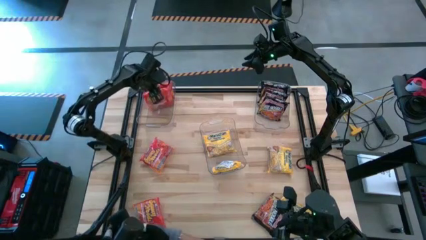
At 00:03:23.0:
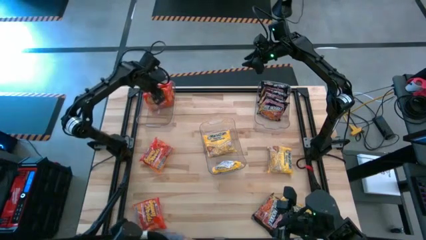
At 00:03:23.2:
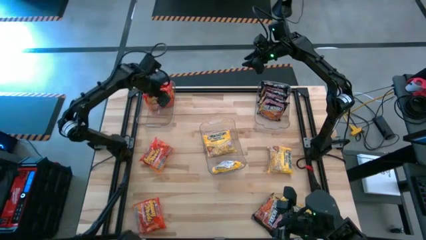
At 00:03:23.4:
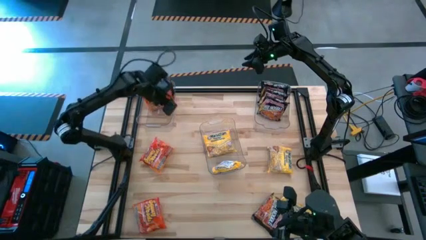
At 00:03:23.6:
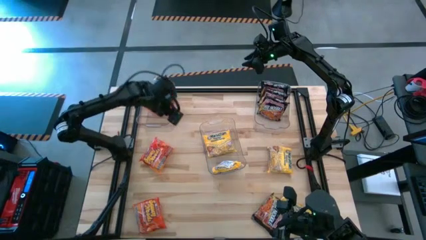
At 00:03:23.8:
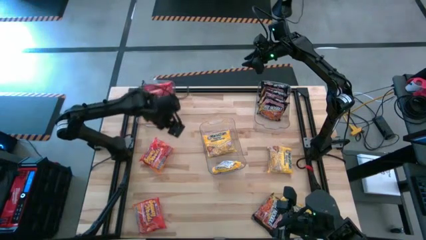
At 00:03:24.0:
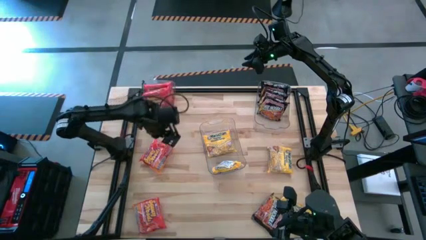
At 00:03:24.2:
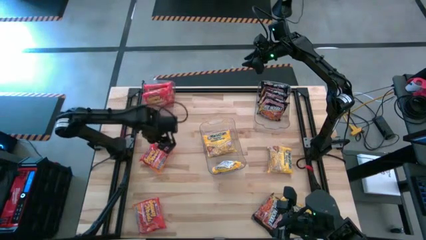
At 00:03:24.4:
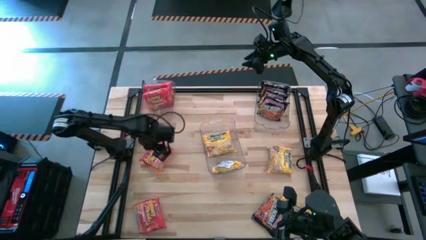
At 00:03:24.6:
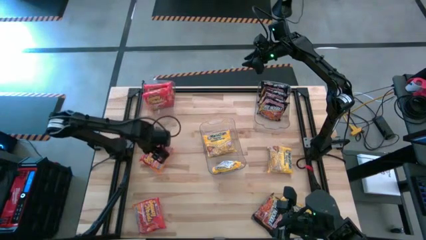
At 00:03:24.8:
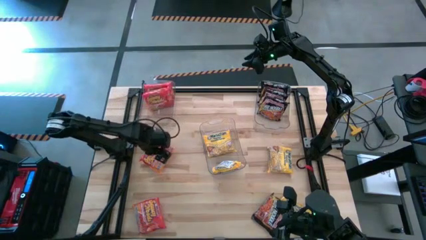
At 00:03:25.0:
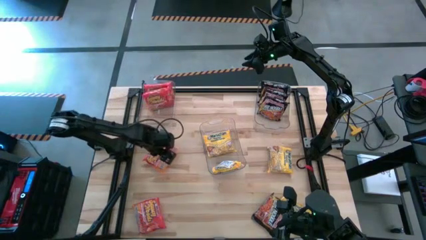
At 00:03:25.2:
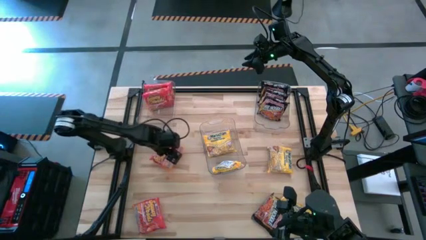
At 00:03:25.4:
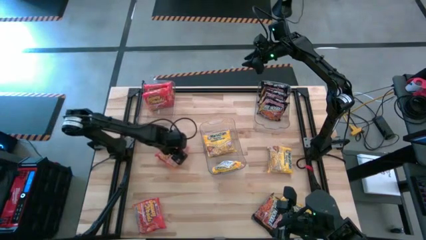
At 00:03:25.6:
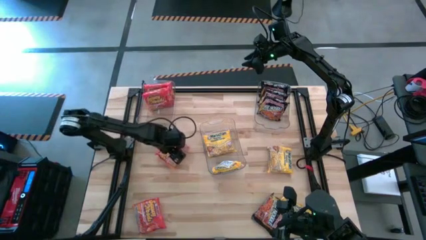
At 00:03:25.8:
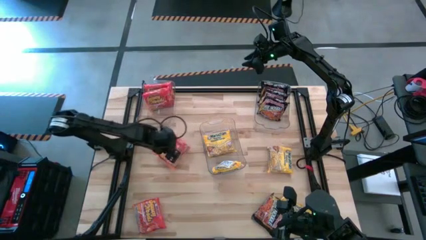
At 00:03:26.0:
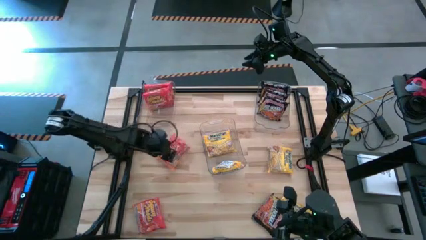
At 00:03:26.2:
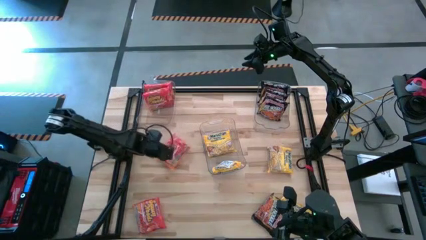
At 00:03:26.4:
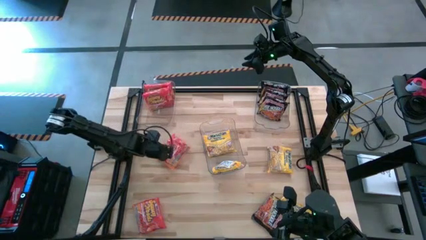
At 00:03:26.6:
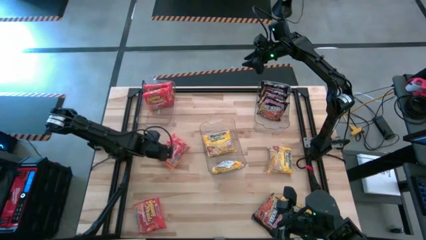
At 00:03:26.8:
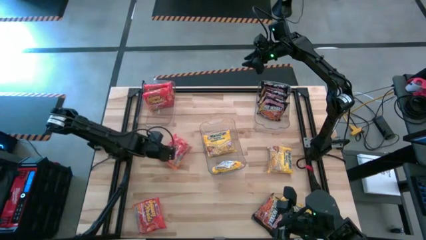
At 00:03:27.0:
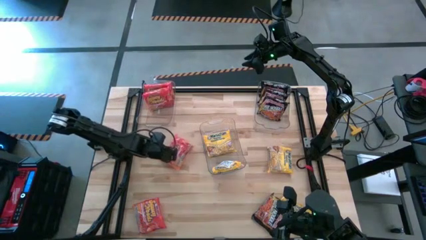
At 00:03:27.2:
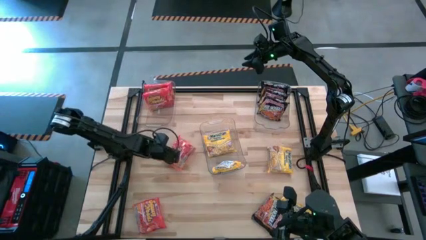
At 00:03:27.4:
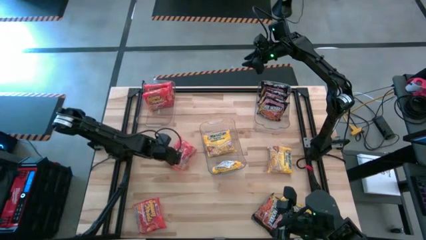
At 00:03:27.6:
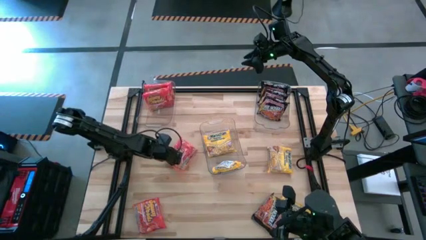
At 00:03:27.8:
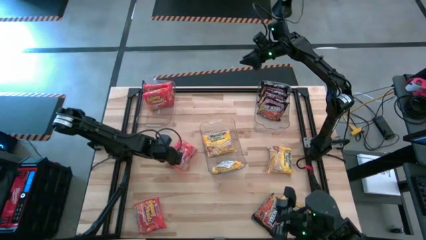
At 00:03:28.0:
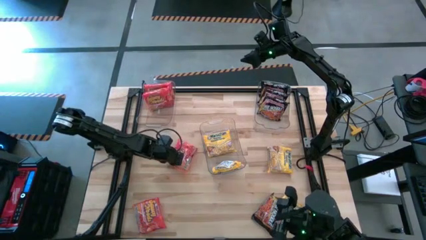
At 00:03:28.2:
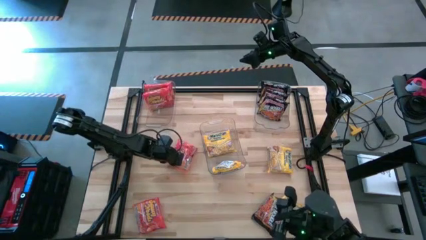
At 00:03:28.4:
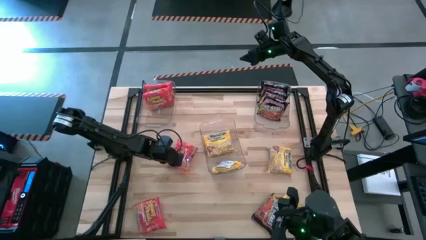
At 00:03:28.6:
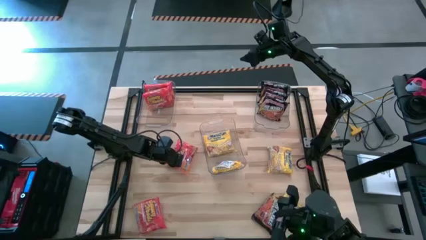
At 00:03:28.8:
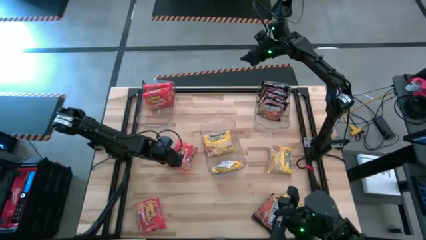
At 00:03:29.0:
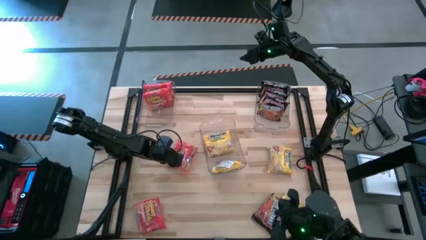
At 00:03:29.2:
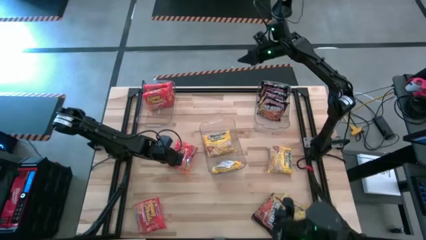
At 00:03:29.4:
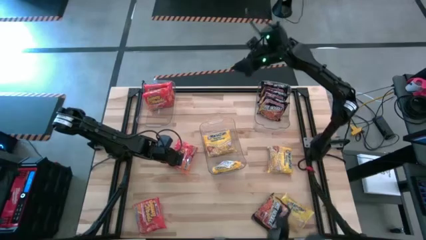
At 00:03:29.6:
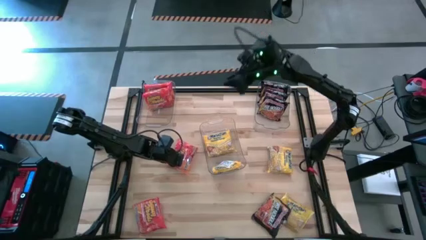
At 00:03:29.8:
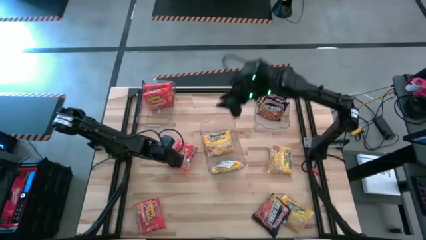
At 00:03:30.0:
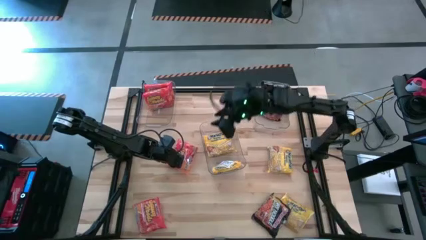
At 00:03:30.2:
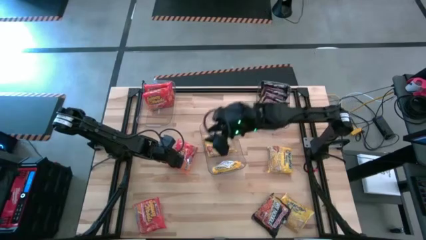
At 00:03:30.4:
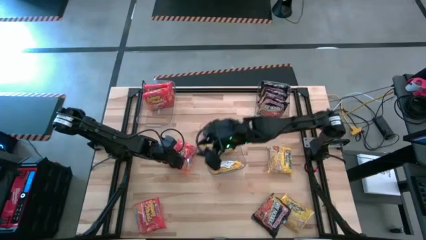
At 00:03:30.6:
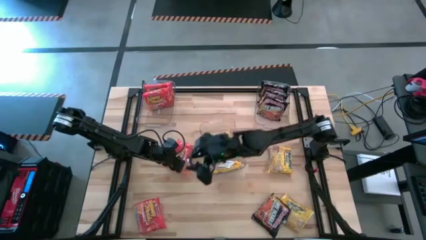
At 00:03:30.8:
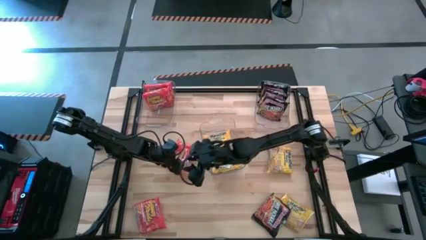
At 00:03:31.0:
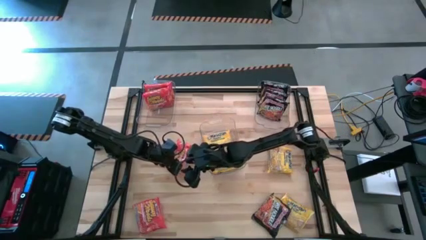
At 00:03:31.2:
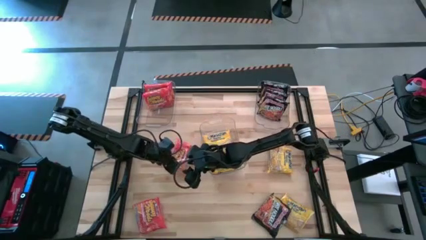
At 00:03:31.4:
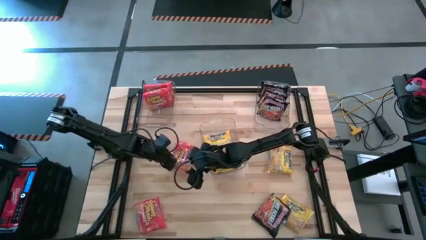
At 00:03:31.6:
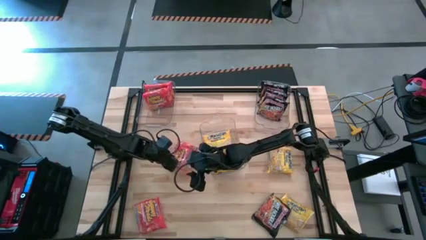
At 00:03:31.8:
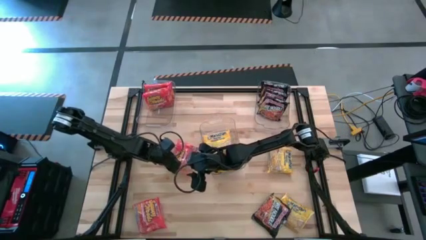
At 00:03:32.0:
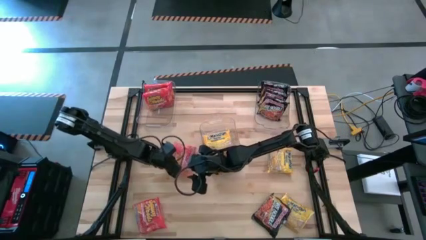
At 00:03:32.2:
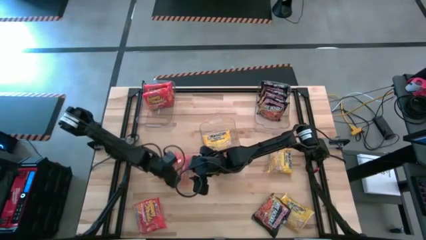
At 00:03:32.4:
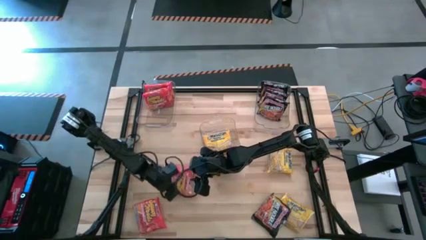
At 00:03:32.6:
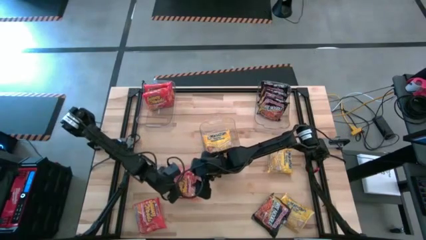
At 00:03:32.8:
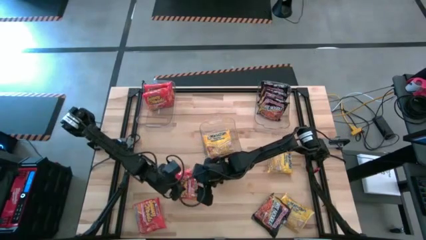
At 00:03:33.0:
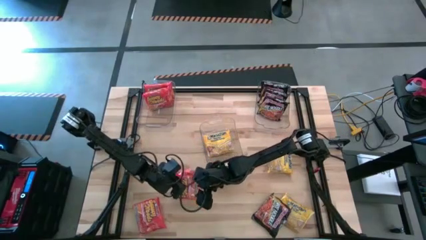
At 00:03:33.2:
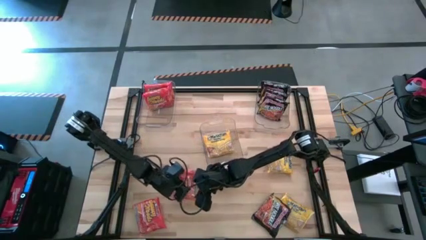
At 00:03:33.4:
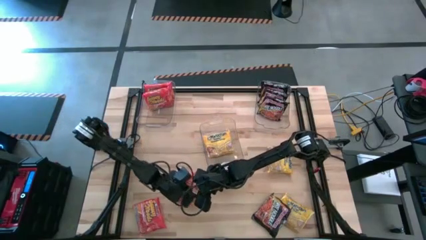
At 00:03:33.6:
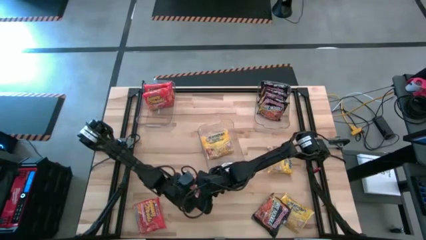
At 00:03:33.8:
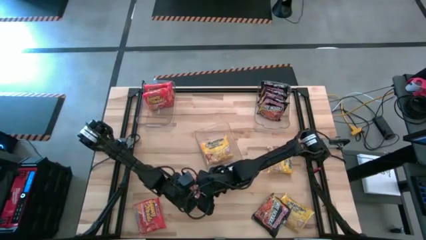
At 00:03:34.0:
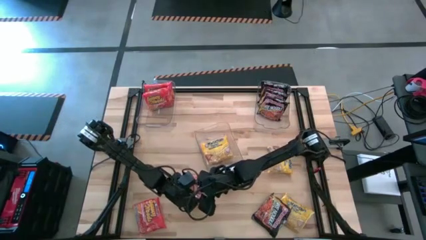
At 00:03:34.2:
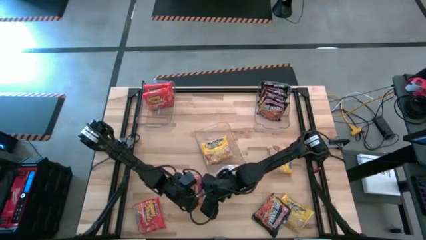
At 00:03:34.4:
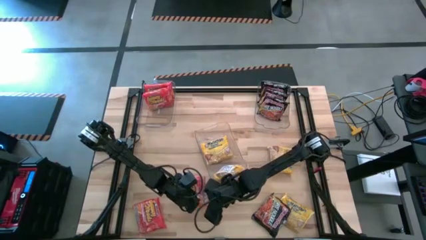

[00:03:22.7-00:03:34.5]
Task: Sort Maruchan noodles
Put the top orange noodle pack into the top left transparent bin

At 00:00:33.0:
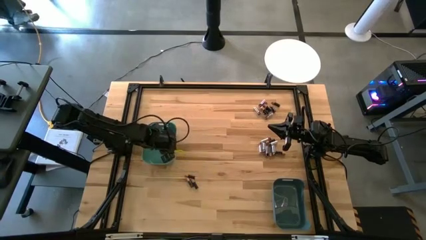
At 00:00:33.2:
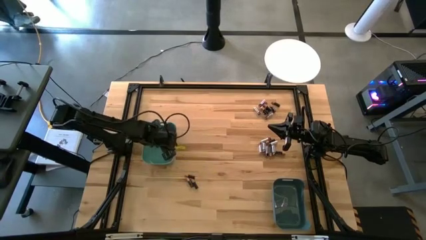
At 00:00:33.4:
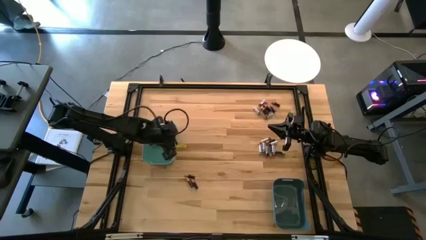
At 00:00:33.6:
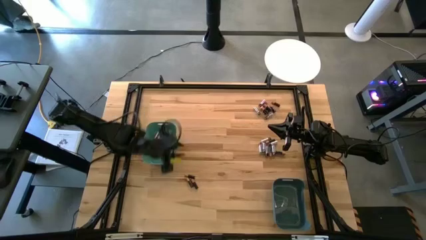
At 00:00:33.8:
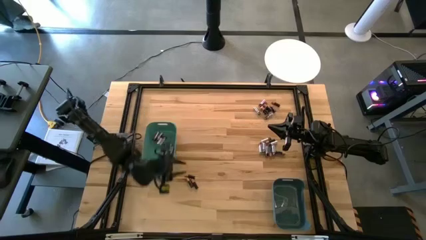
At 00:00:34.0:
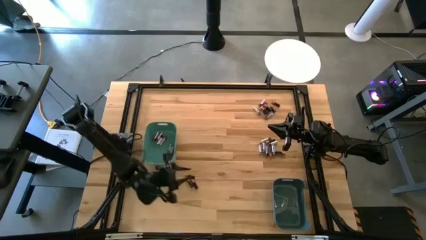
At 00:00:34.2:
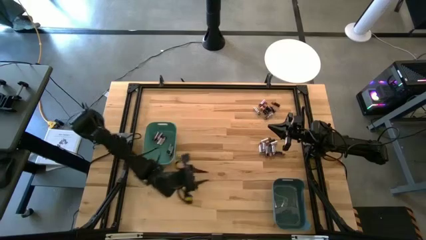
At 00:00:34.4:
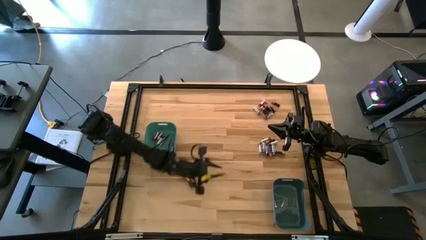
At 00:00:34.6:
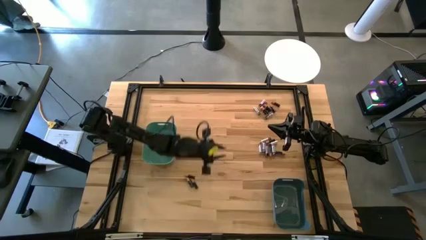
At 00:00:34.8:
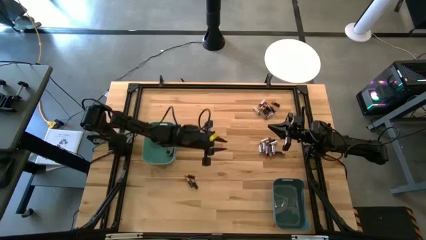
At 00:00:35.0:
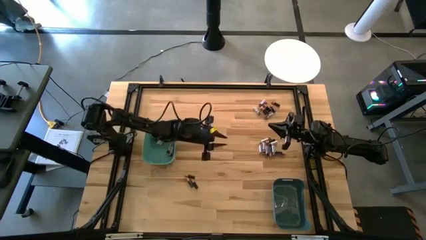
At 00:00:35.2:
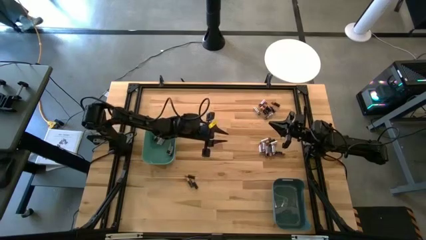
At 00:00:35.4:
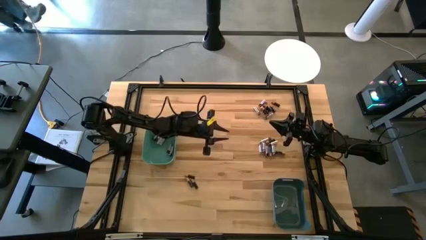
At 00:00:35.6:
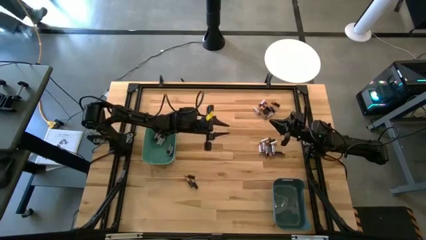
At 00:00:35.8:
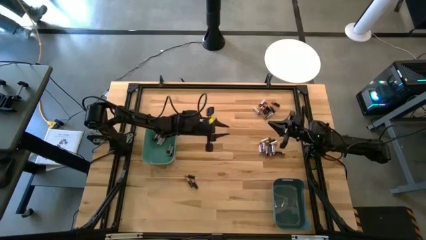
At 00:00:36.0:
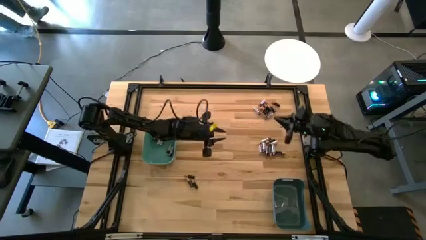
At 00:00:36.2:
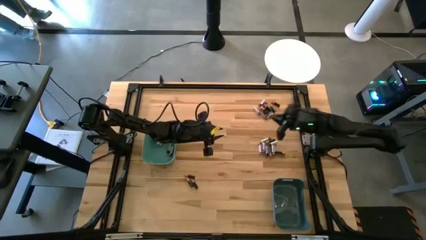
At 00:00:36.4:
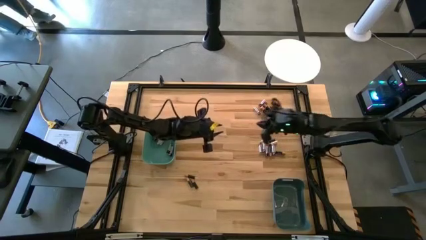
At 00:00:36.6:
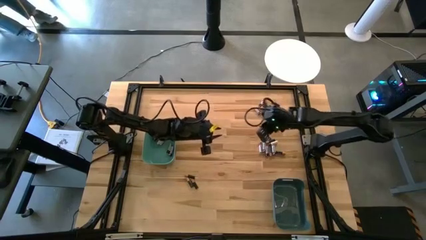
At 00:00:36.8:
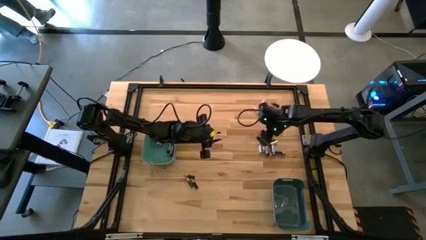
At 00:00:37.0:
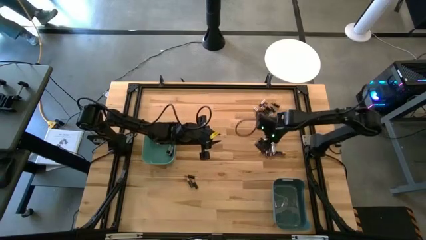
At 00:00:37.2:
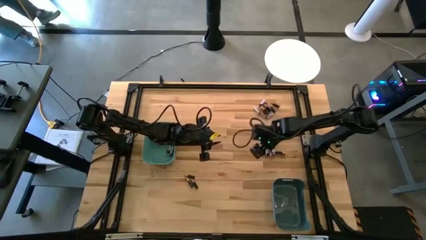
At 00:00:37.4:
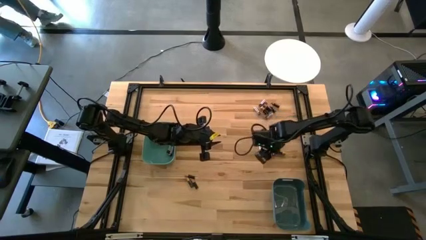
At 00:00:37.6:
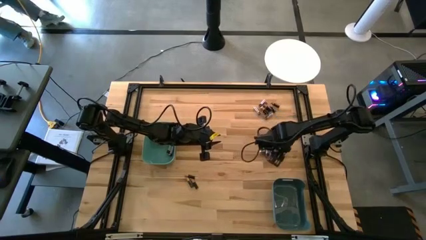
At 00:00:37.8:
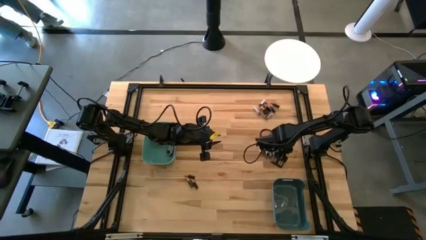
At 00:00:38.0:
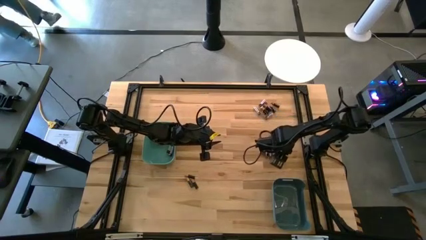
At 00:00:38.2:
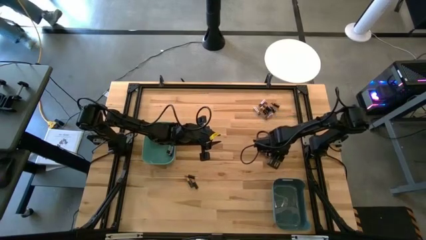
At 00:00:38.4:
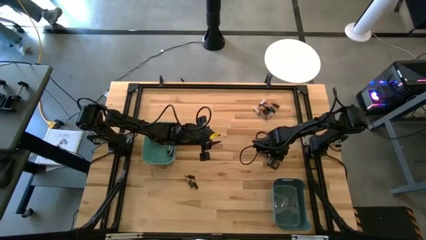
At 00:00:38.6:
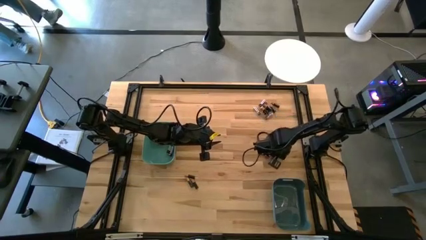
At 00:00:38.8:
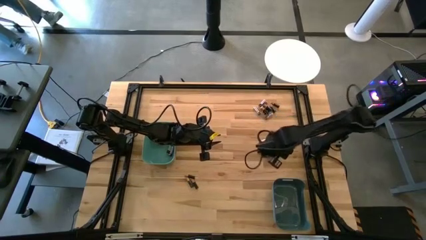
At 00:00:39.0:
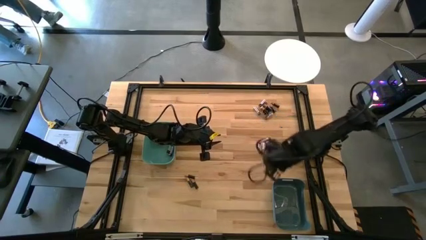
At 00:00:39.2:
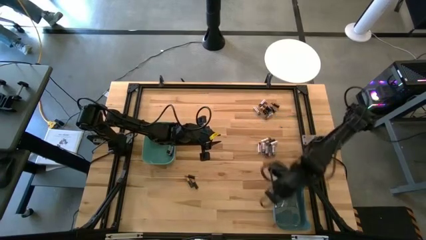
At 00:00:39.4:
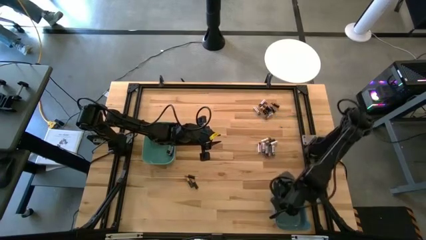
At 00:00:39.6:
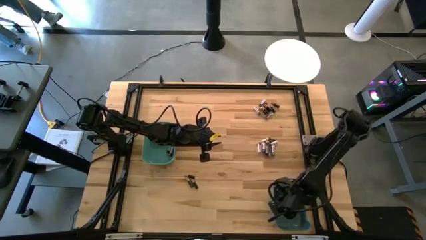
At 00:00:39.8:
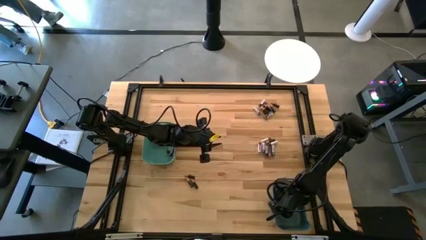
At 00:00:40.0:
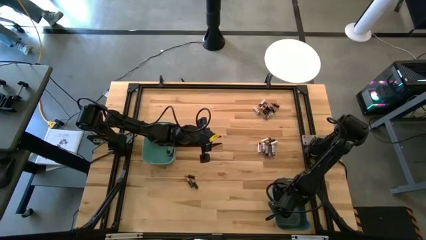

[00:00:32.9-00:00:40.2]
Task: Sort batteries
Put the black battery into the blue bin
